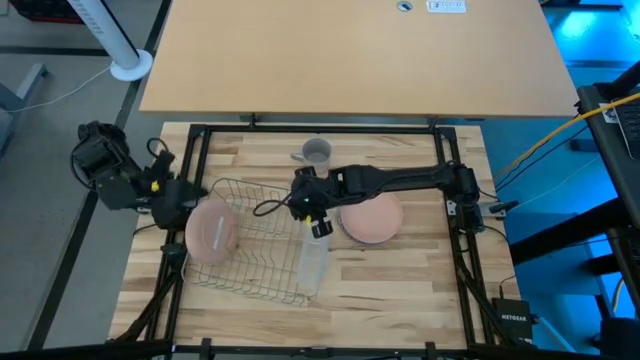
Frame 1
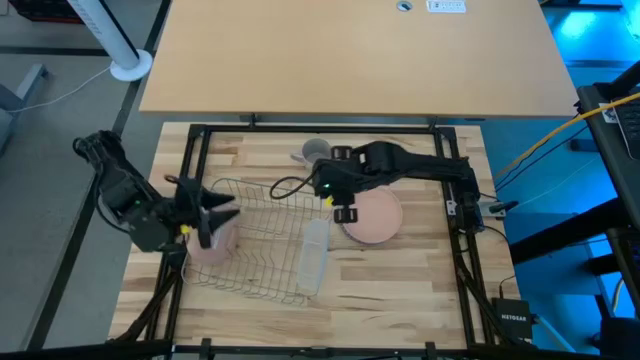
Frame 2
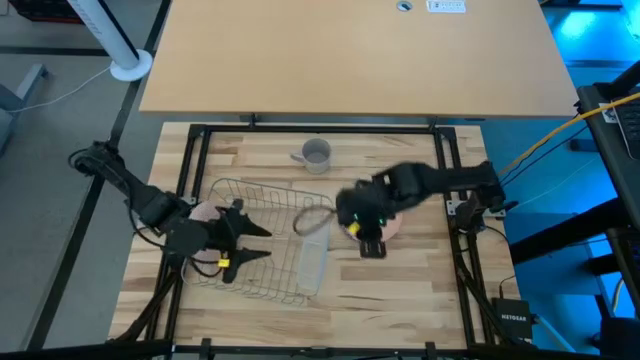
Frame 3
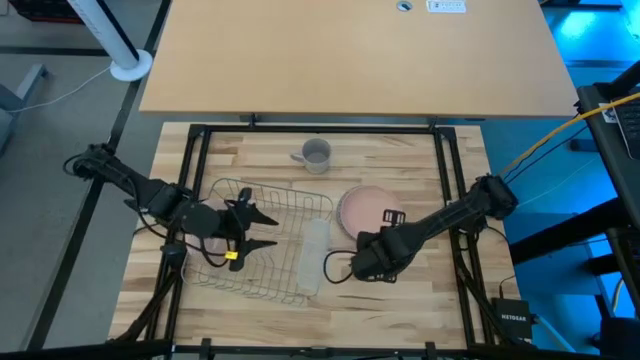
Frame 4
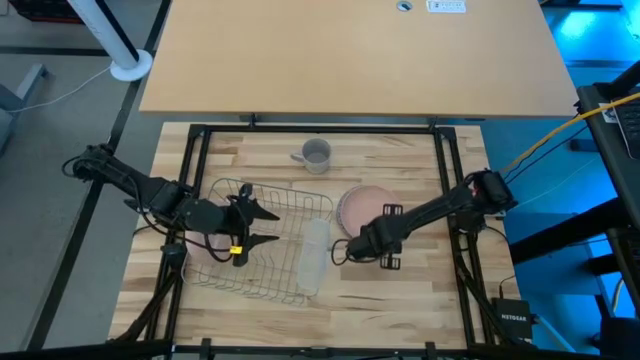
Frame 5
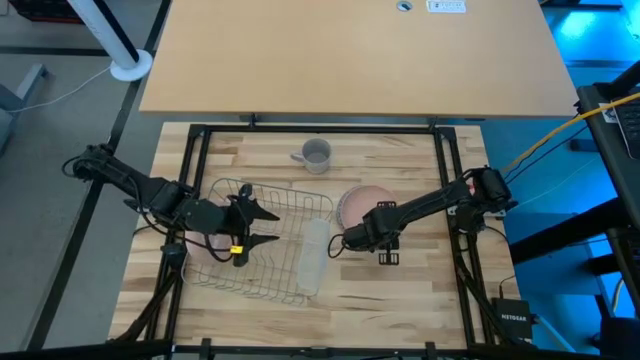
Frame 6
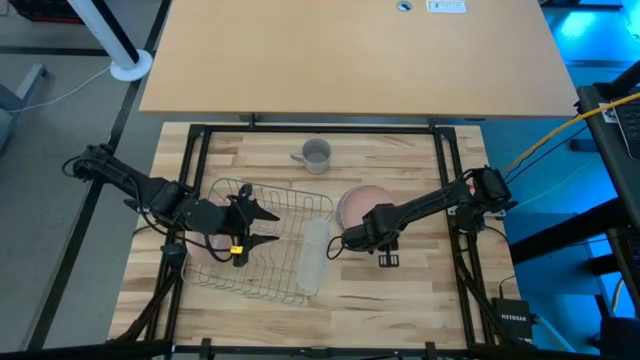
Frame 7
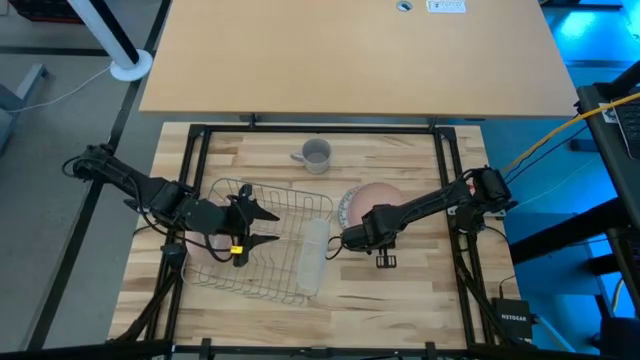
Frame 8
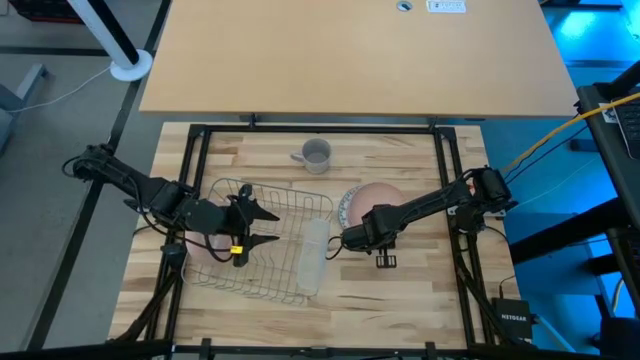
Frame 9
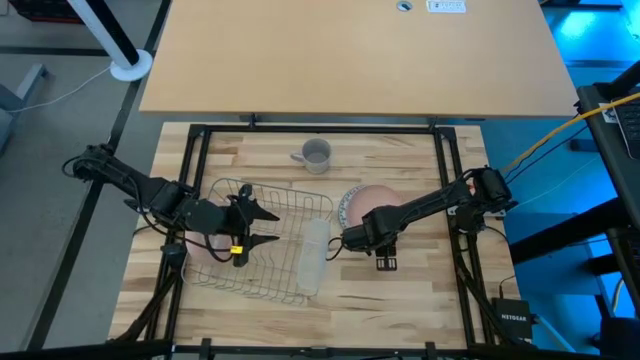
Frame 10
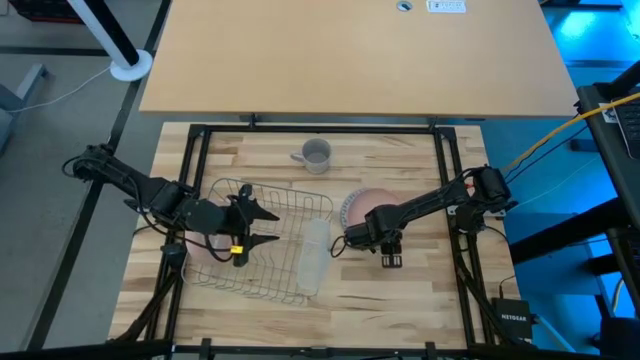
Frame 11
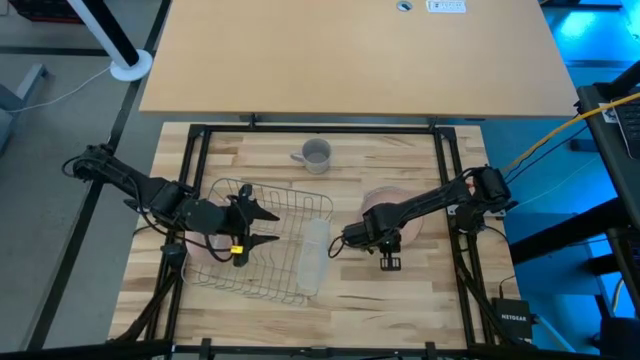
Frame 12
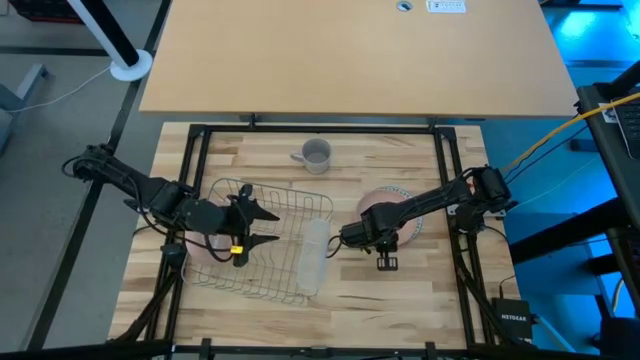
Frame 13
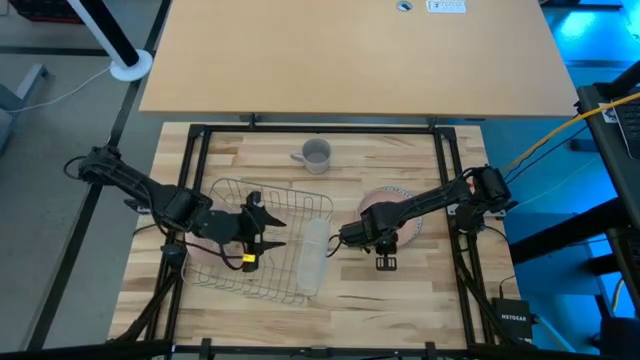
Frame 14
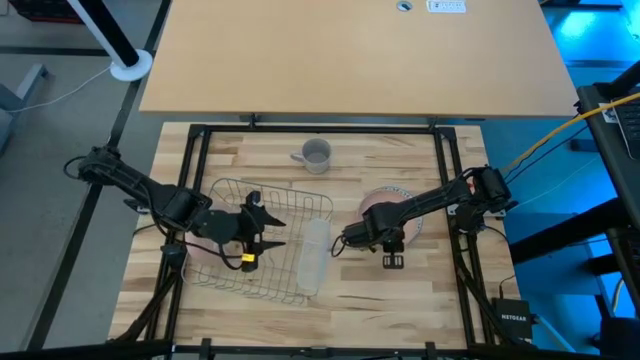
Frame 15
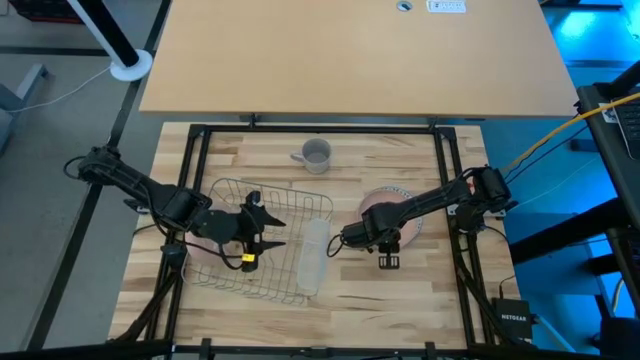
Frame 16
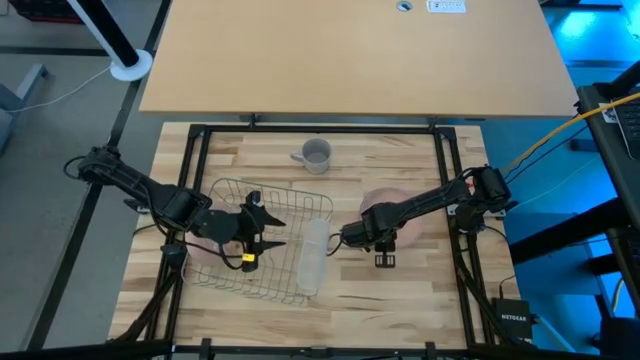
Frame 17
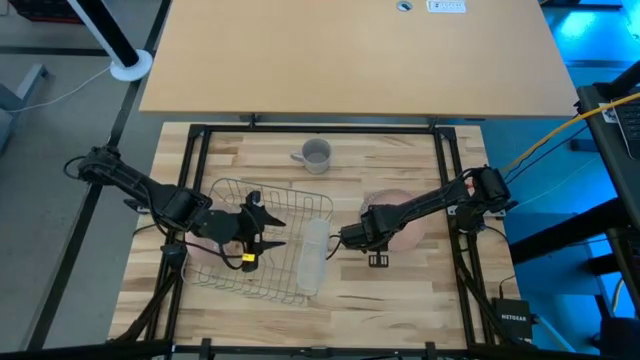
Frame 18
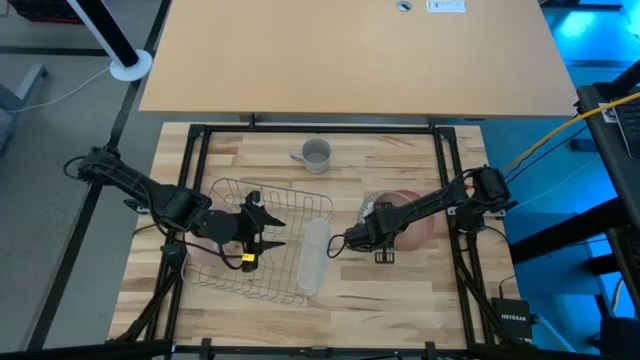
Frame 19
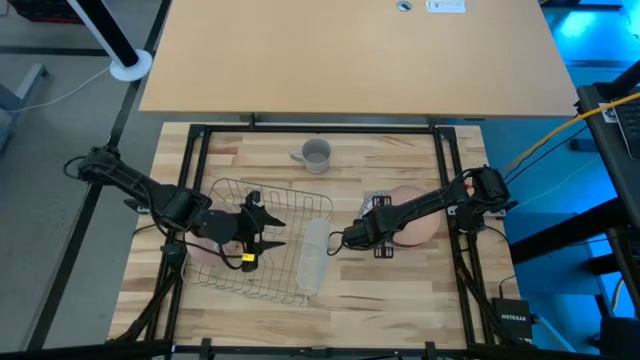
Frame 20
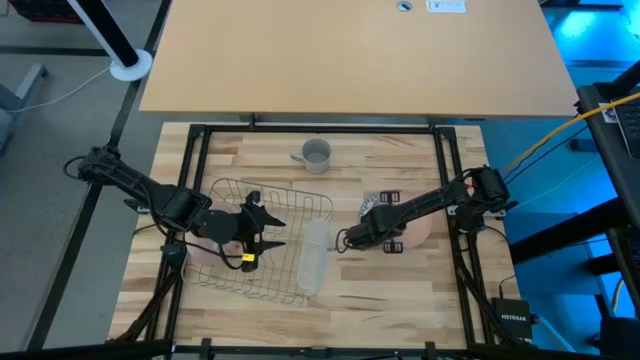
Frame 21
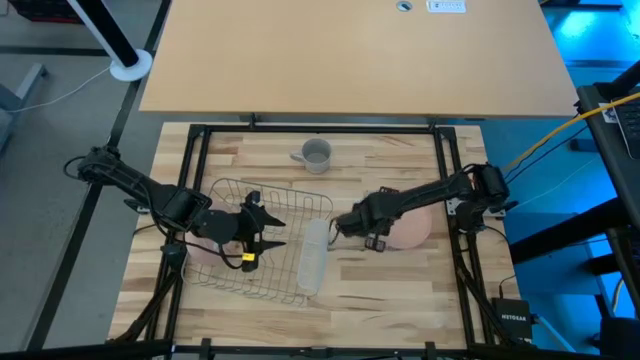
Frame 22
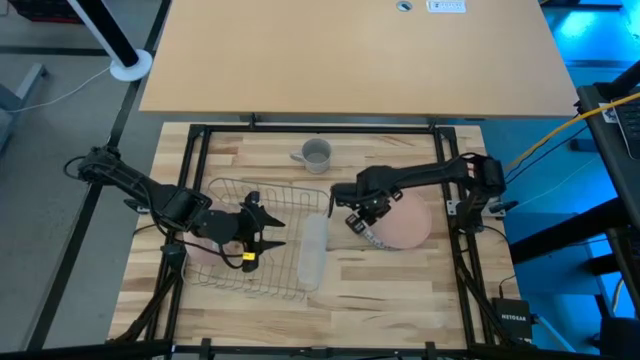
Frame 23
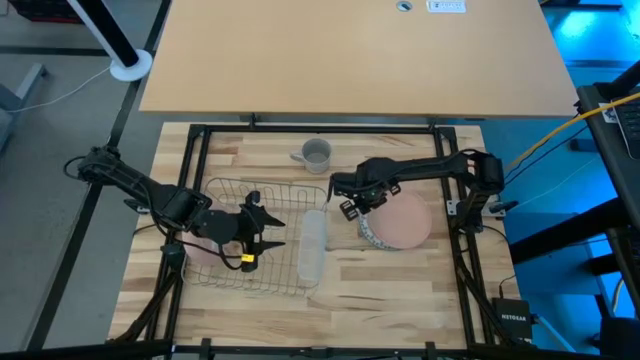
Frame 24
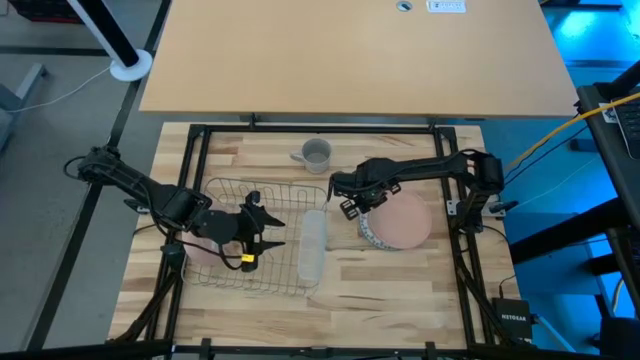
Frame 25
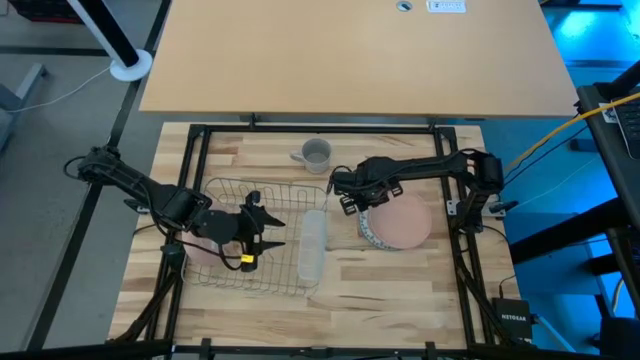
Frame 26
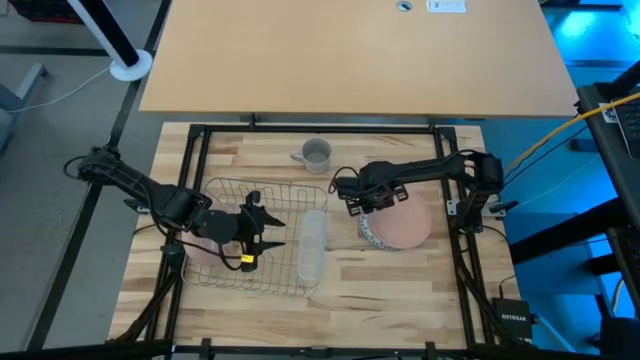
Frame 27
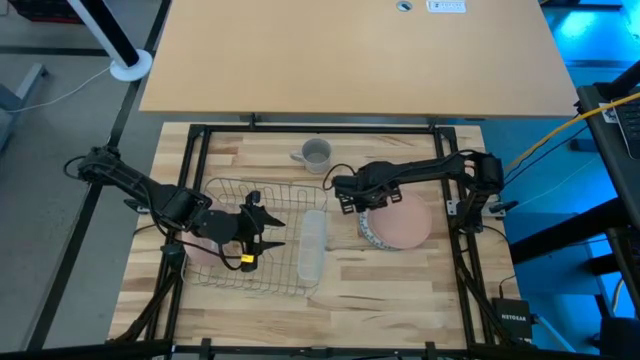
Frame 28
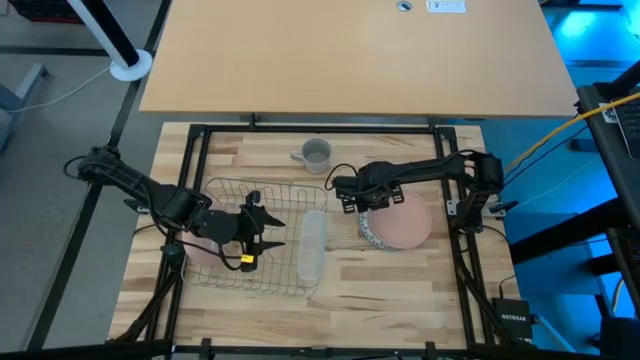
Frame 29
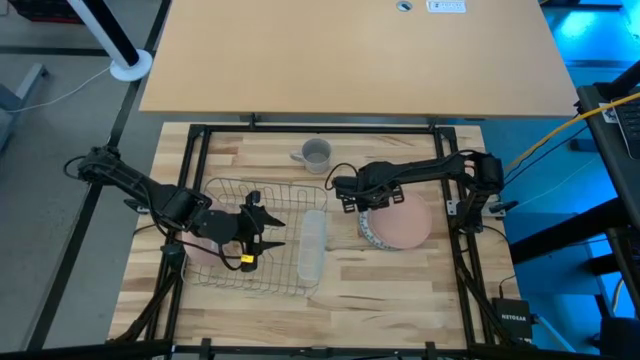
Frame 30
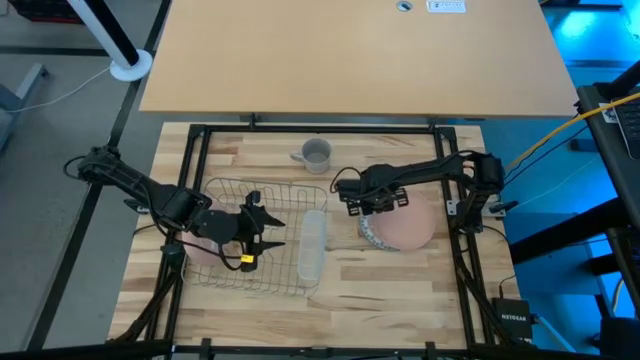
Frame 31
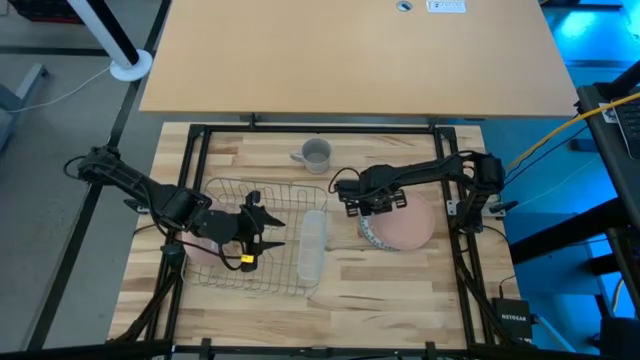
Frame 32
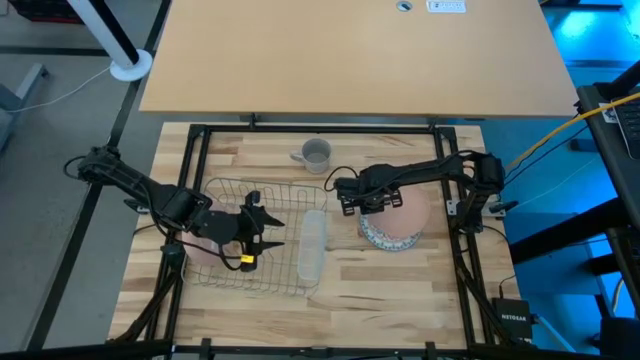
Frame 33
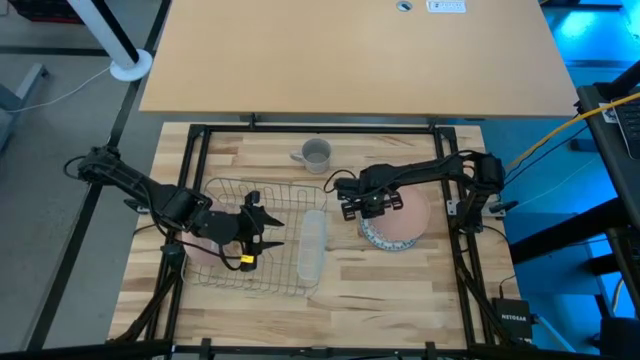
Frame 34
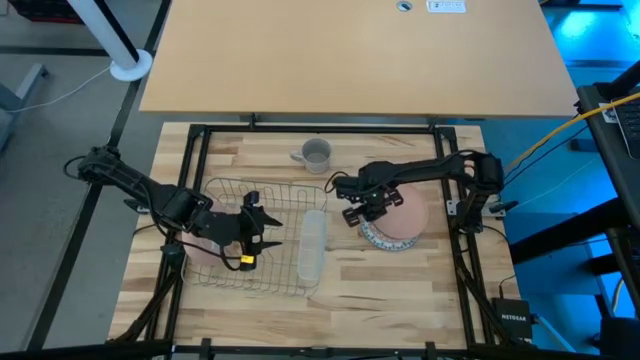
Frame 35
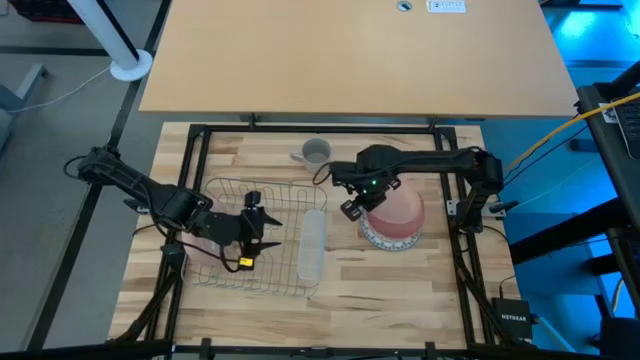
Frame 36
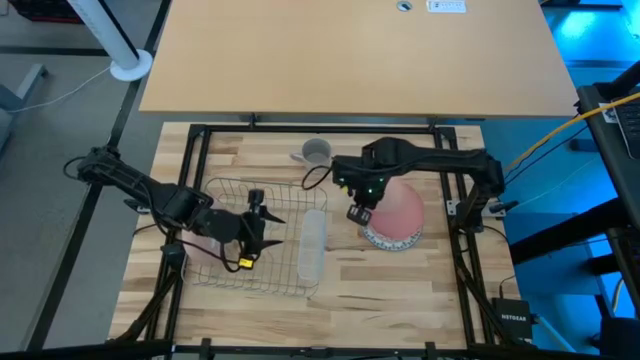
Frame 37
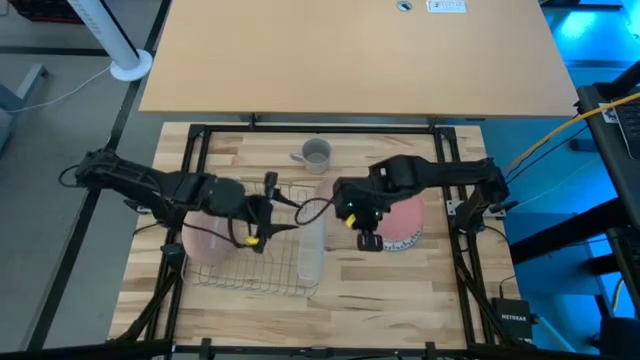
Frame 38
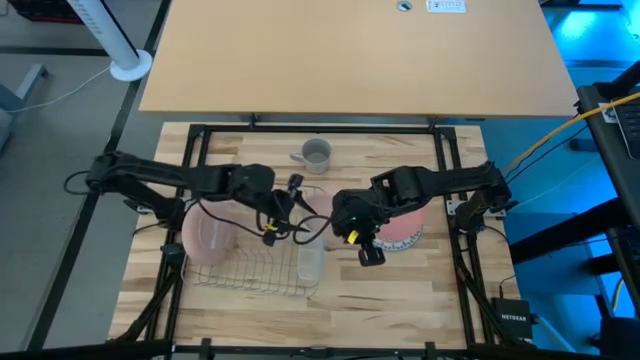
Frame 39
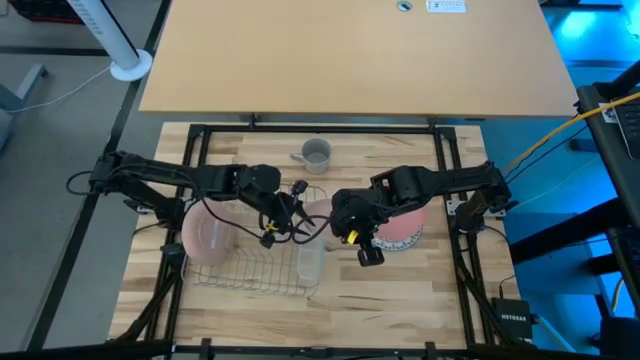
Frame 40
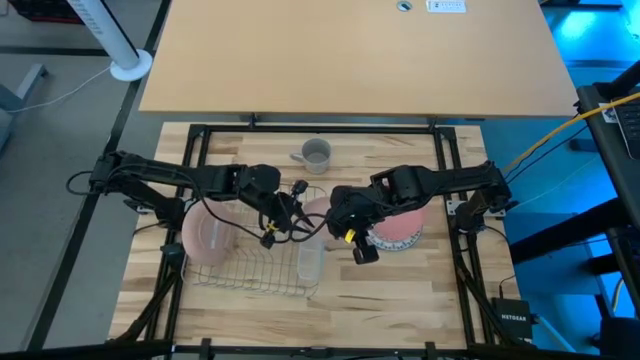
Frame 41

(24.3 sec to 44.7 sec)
Task: Sort dishes
Put the pink plate in the dish rack
